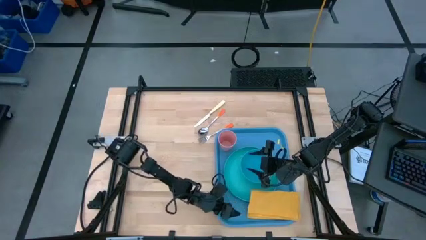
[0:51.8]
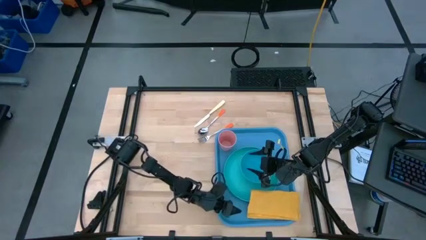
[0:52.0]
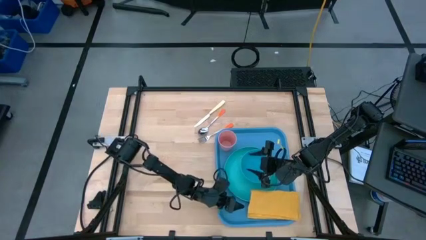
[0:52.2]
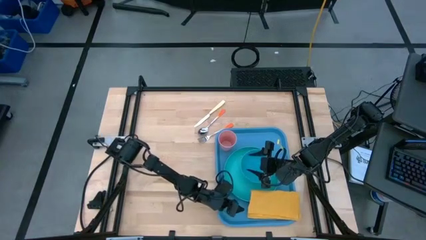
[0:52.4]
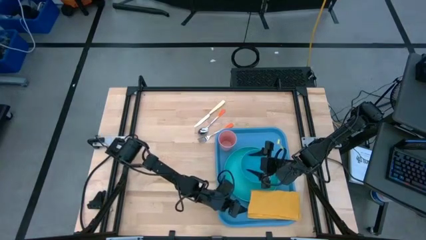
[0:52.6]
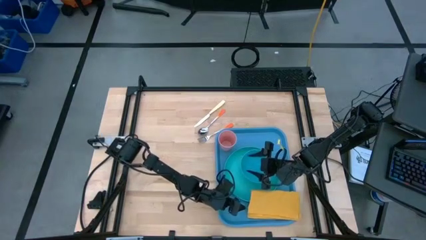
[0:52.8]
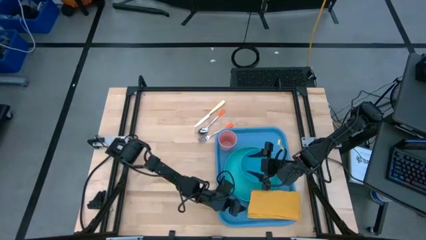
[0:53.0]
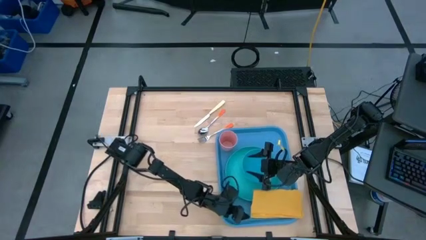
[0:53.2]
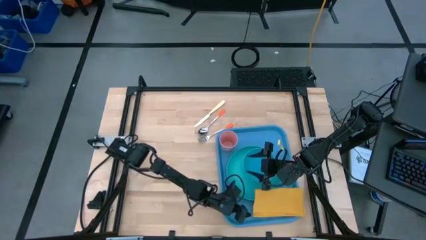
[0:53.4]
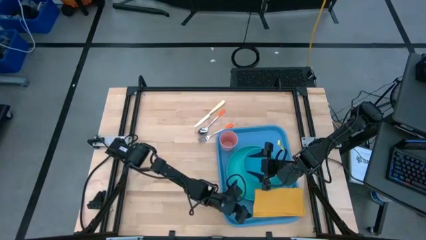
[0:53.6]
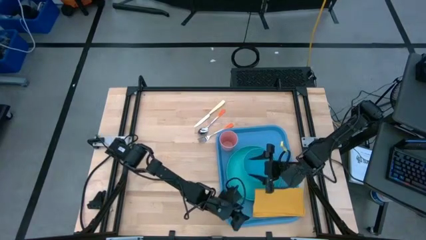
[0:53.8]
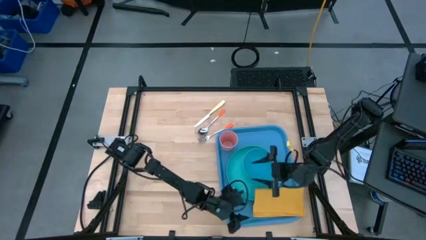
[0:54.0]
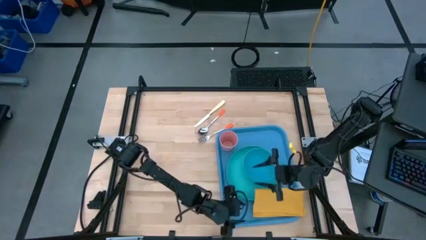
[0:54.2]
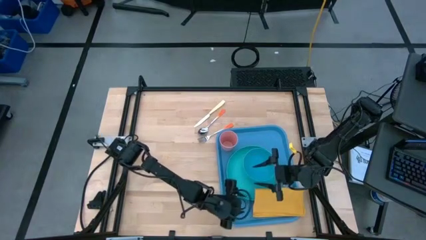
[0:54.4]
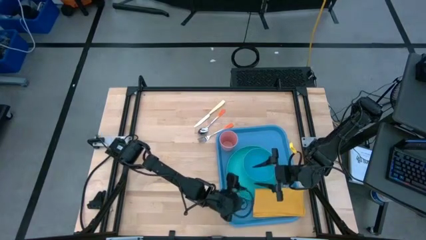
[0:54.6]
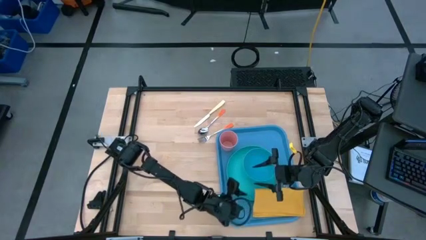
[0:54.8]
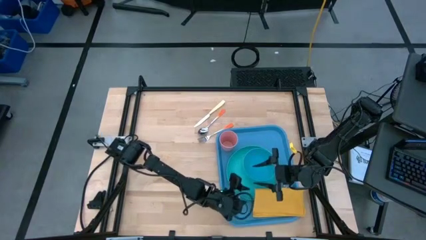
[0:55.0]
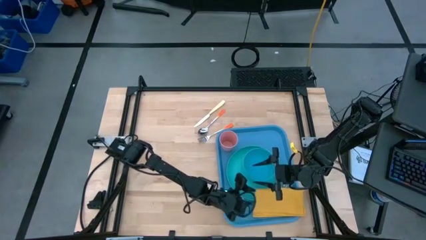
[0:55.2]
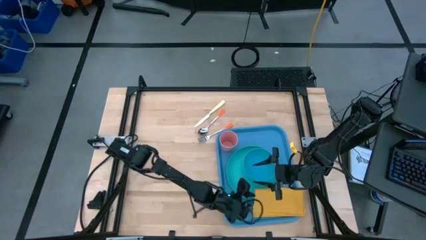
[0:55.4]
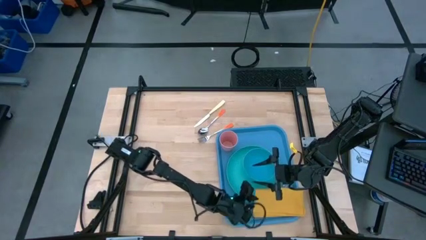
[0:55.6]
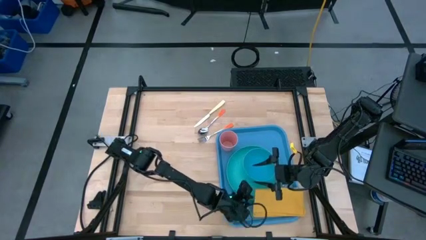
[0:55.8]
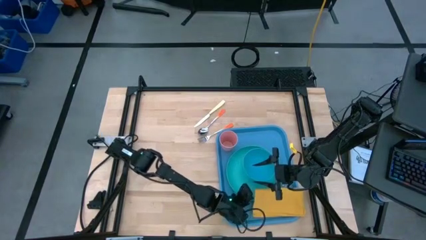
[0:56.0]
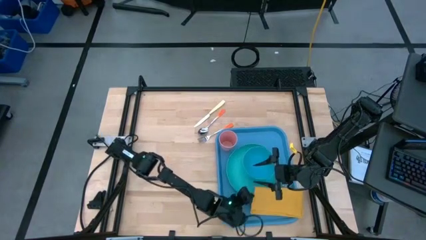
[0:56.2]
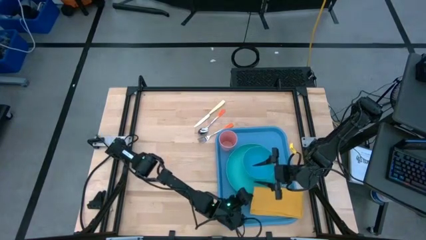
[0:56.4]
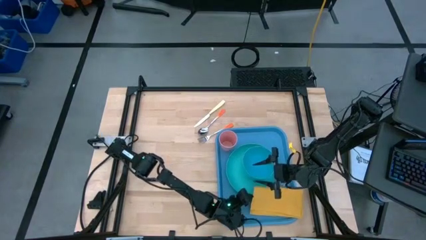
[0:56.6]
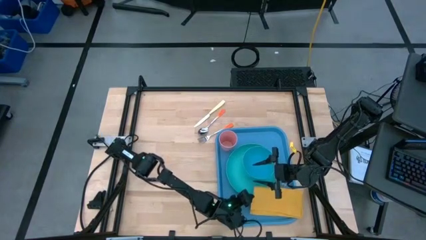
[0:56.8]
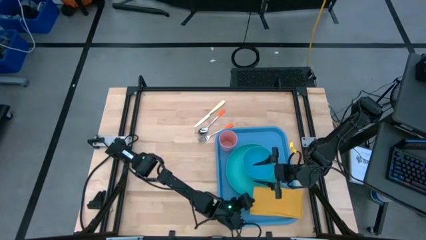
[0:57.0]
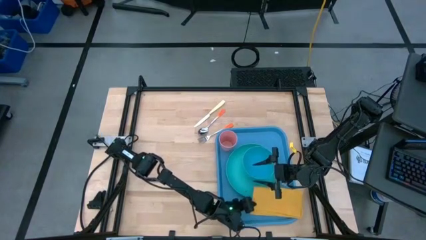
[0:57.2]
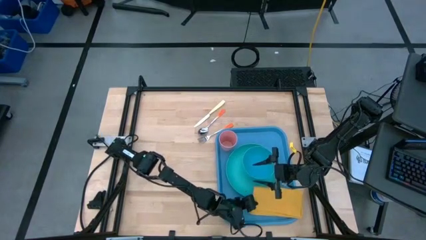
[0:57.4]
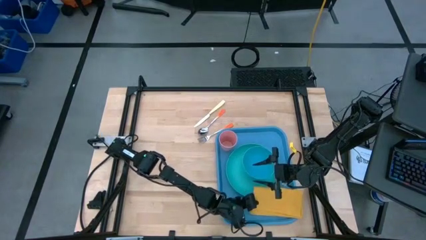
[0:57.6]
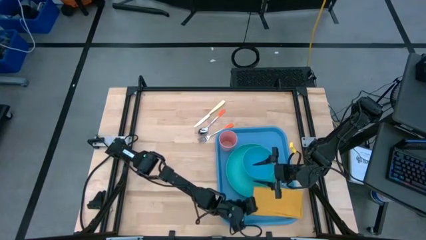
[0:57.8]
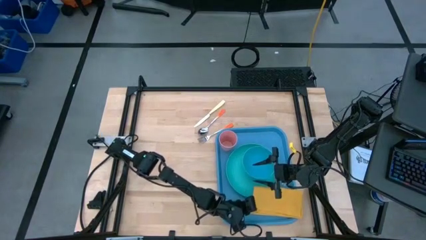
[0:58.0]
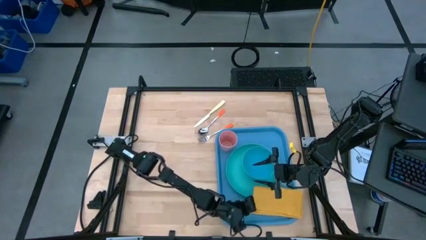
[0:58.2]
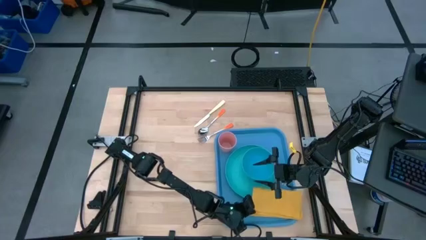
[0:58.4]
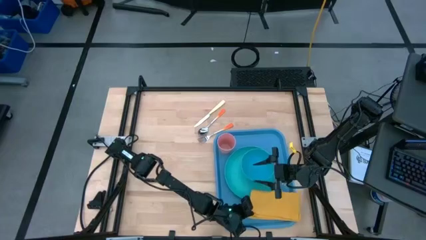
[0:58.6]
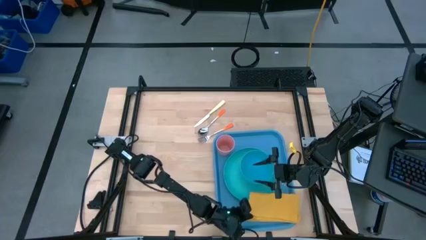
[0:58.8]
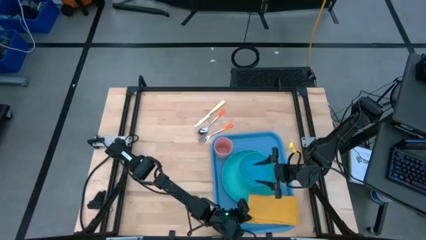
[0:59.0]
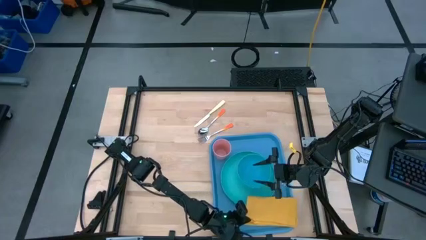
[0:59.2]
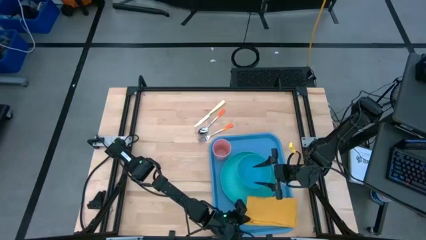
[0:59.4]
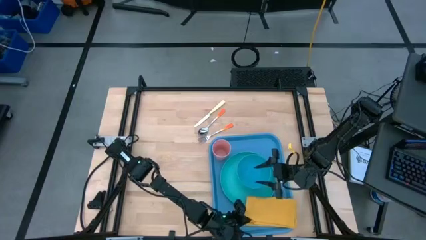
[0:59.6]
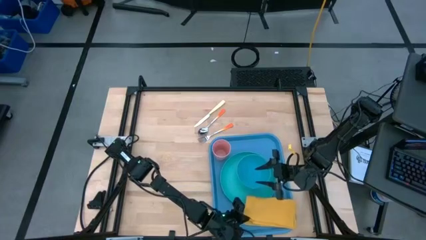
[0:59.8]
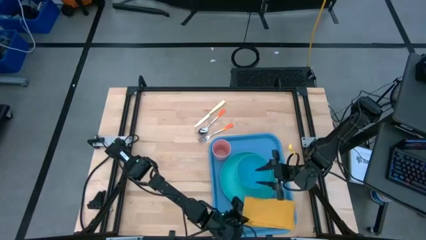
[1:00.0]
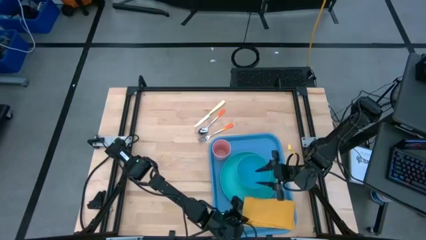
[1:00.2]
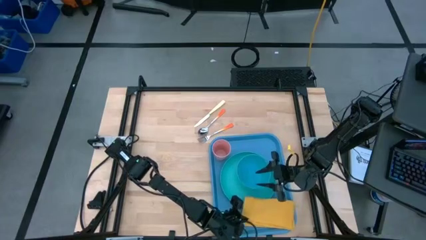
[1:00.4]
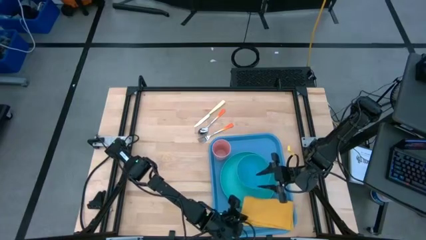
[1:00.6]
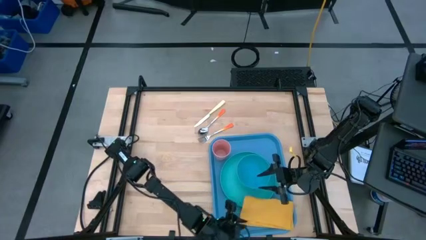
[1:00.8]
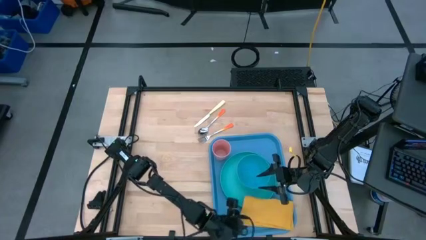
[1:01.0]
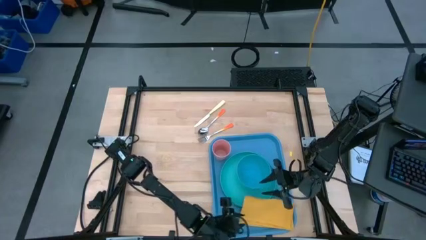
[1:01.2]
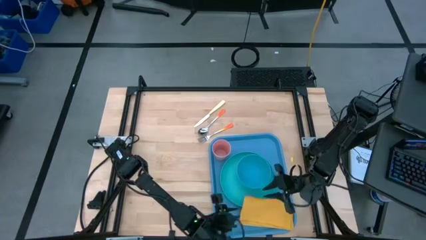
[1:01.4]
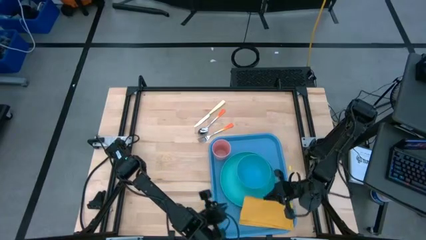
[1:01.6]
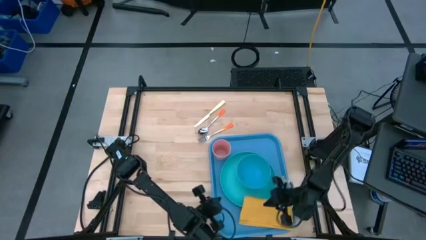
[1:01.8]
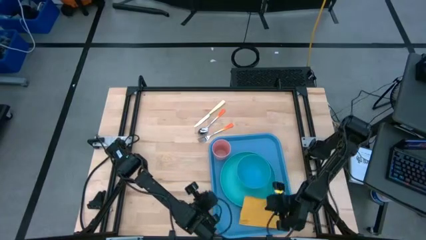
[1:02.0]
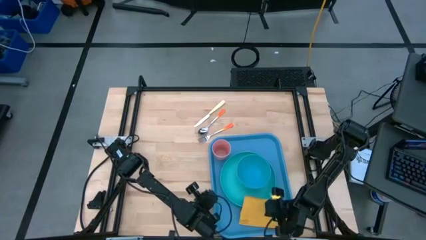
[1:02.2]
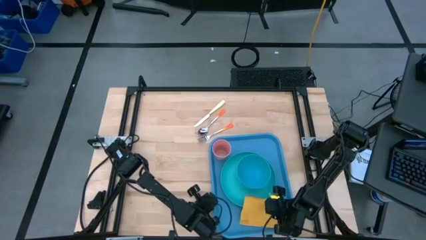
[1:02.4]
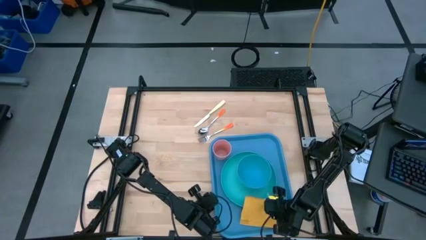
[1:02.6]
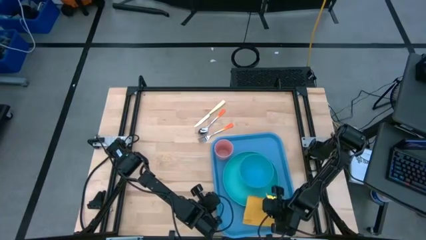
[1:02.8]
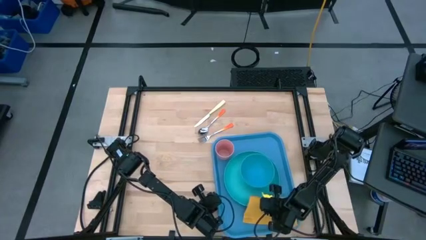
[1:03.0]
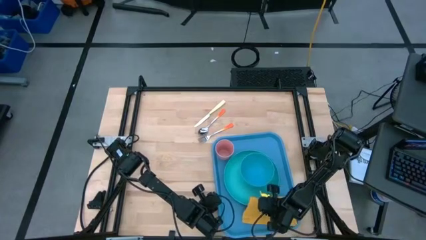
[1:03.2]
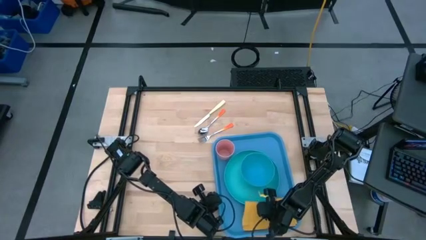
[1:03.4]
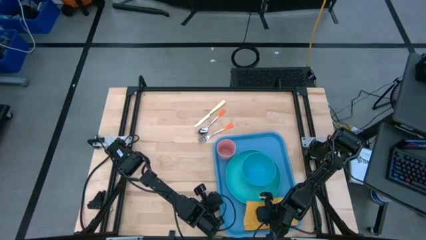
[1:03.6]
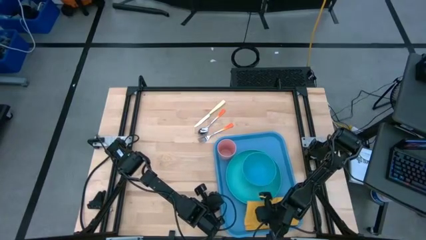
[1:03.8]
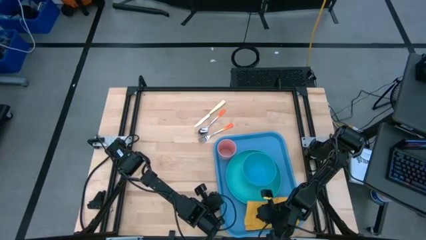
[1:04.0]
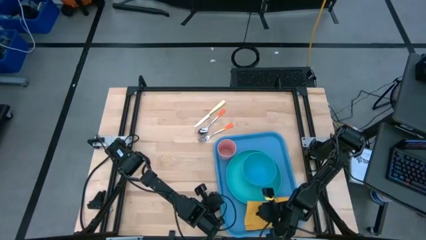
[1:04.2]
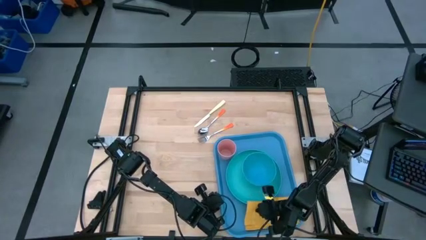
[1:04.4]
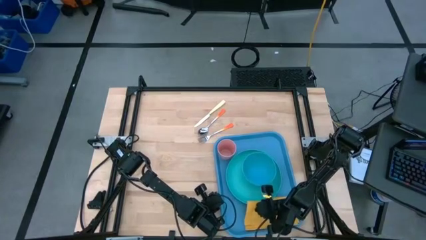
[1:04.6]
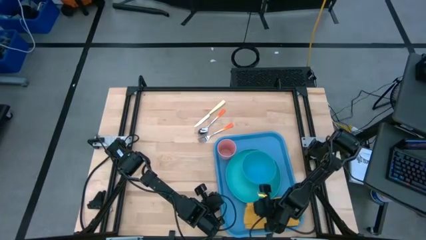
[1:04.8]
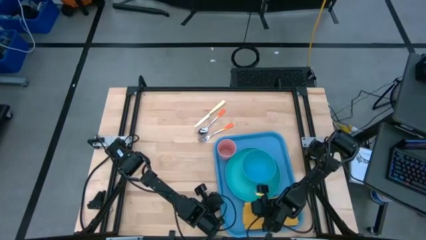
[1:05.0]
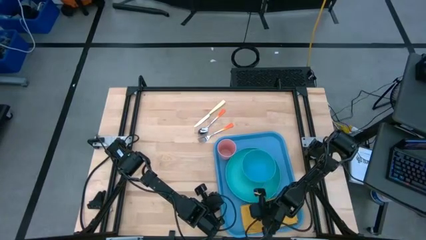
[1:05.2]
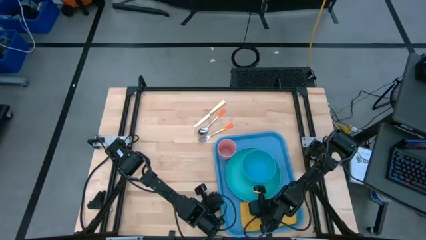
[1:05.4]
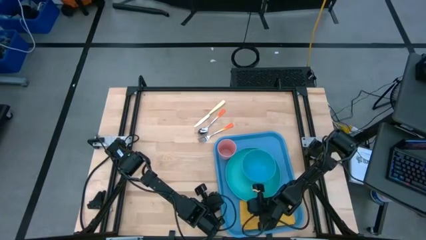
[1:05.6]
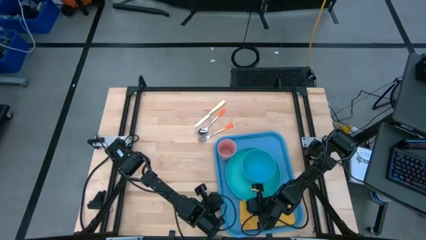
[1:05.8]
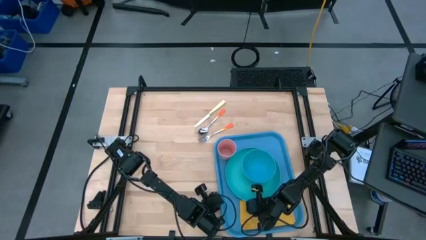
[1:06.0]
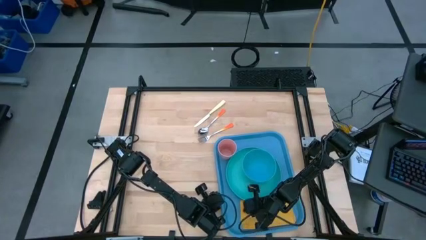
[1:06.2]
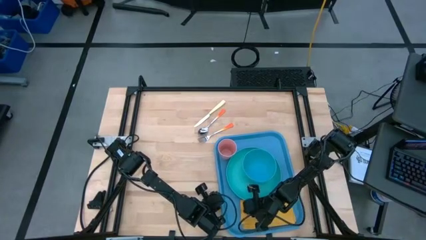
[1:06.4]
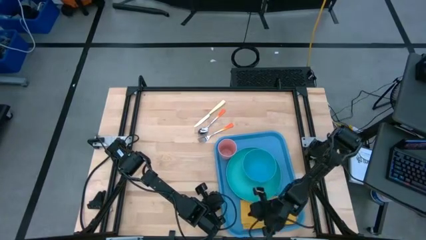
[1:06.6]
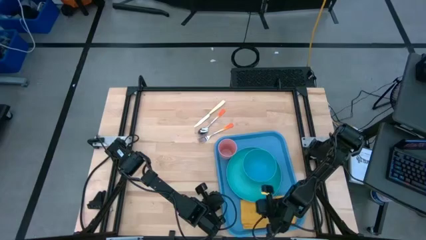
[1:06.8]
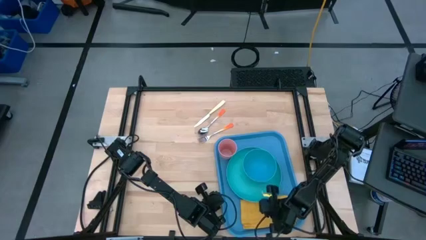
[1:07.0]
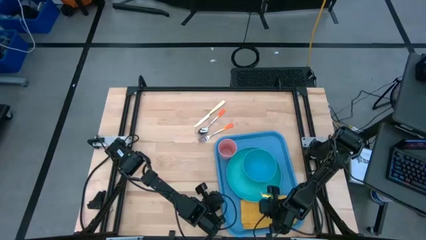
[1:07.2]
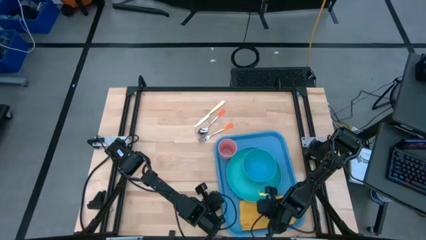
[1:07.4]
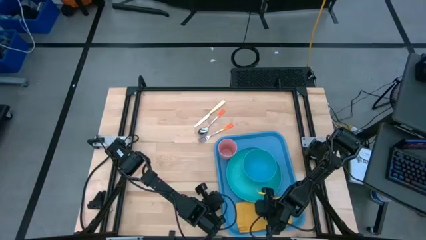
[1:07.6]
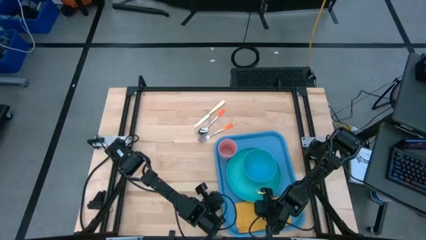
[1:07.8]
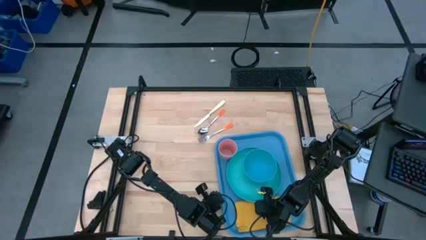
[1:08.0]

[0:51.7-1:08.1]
Task: Set up tray
Put the yellow table napkin on the blue tray to the bottom of the light blue plate
